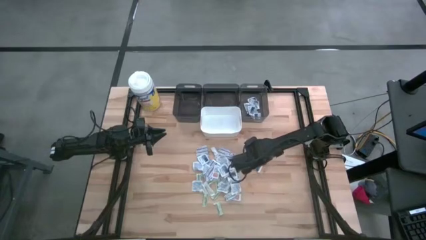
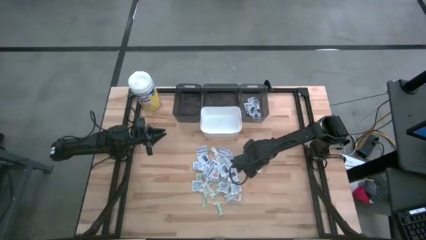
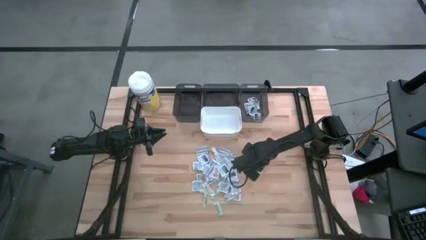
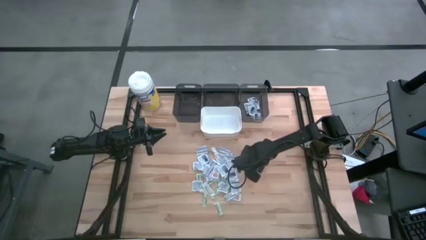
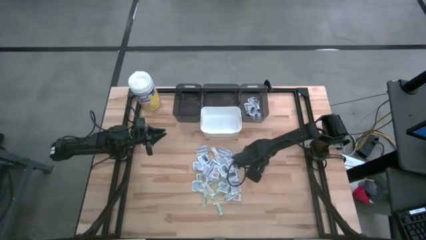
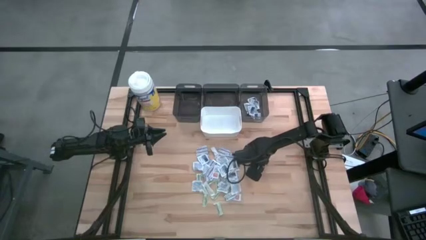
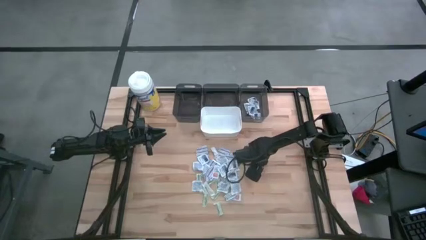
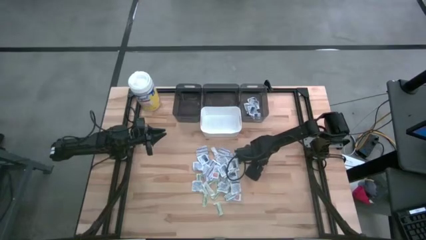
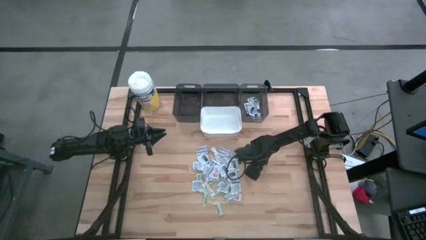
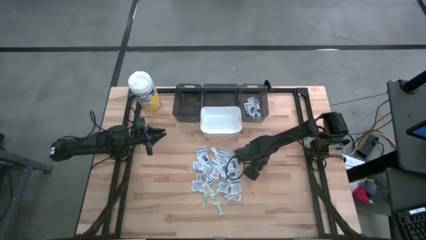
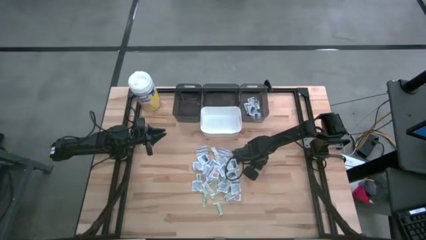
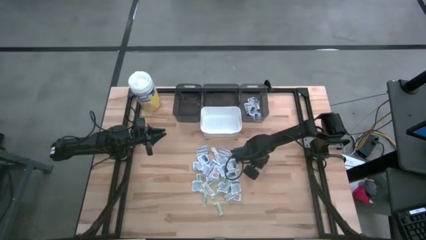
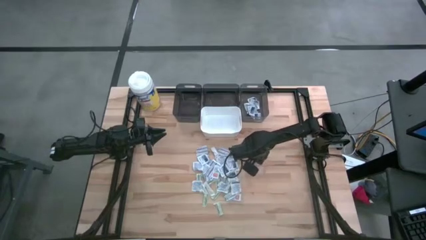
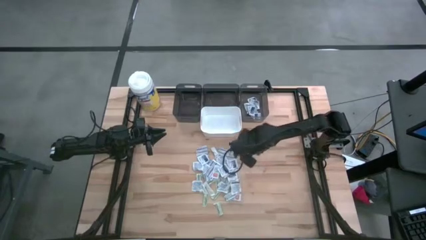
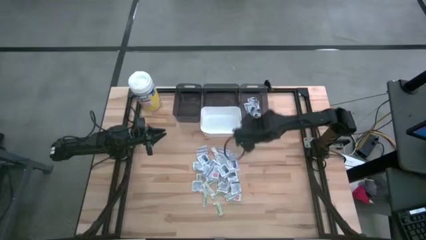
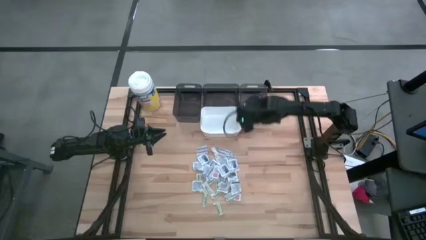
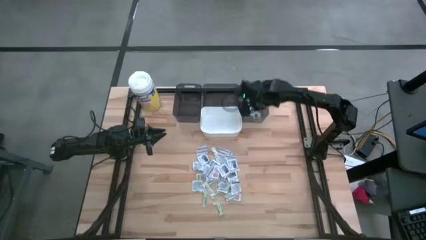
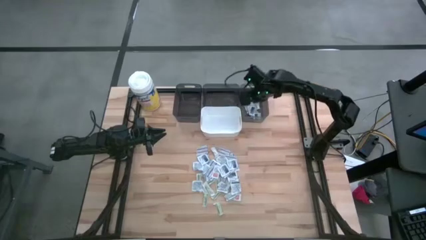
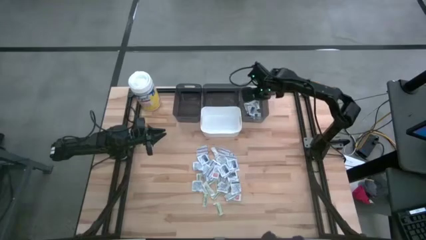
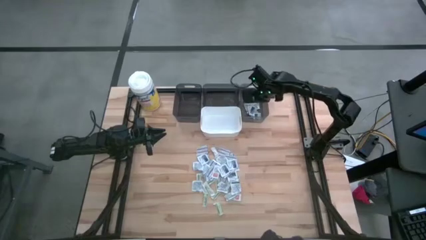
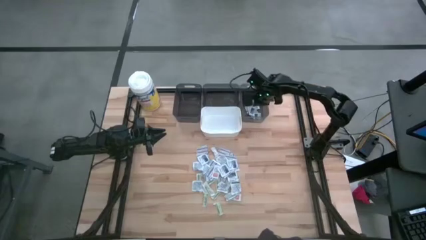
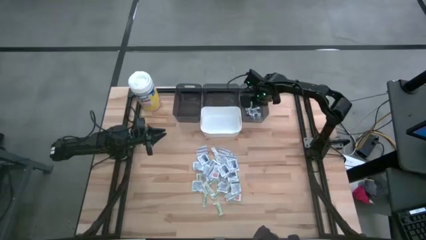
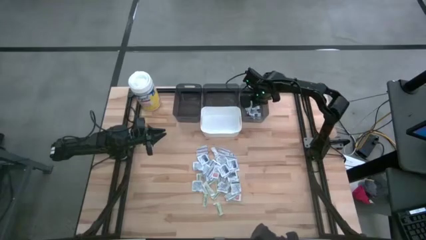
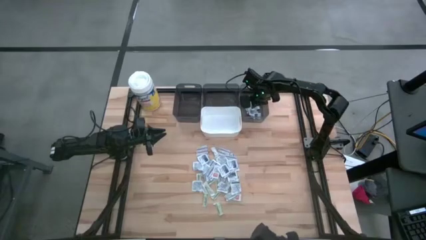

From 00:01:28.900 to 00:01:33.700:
Task: Pick & Place First Aid Supplies
Put the blue alcohol pad into the right black bin

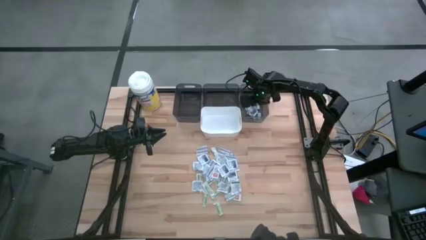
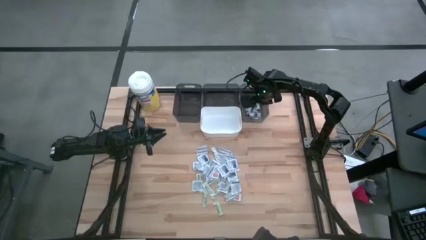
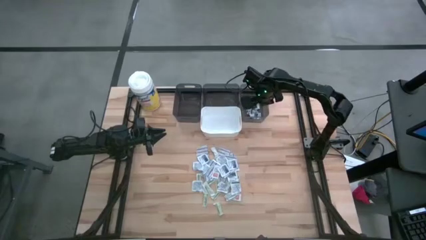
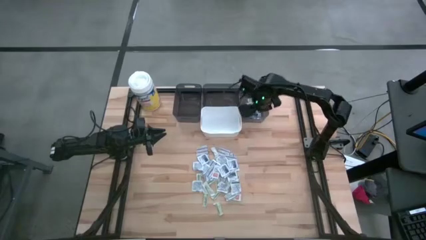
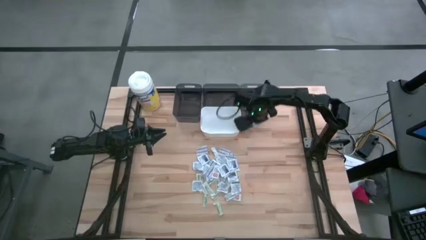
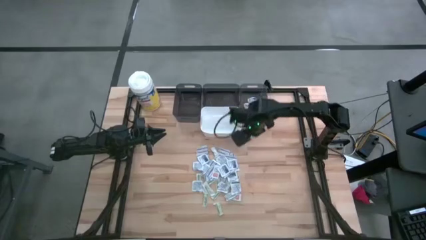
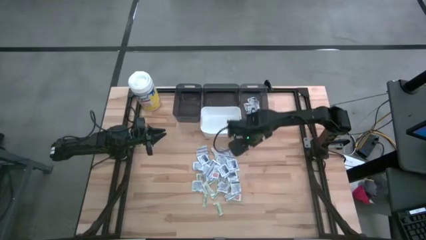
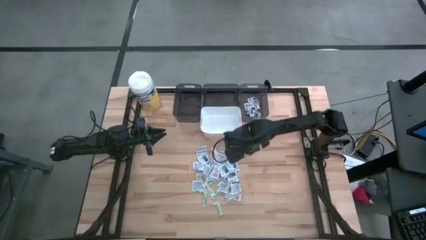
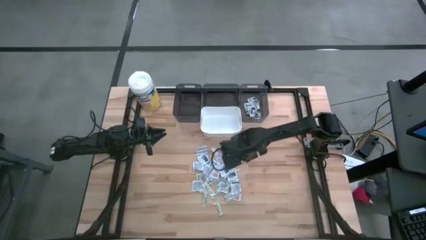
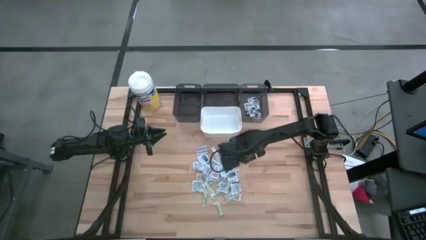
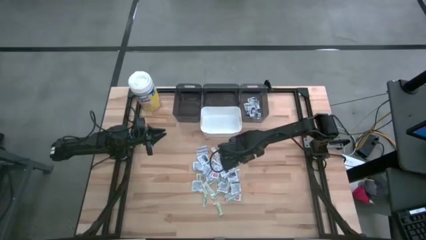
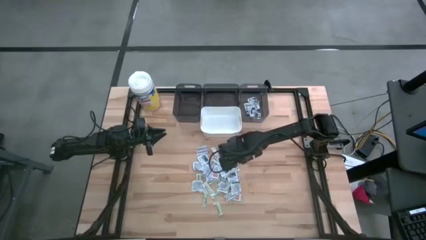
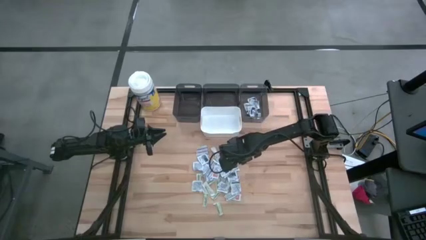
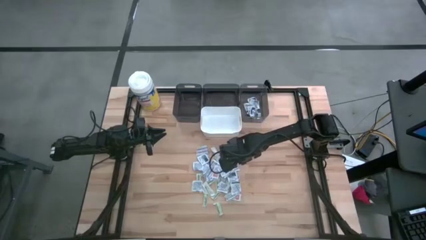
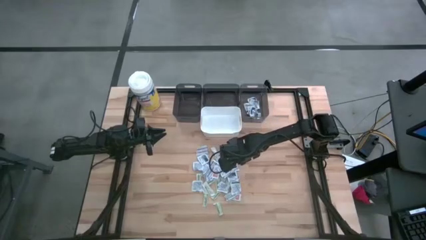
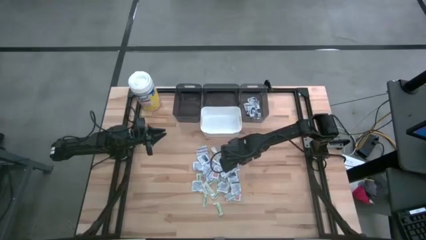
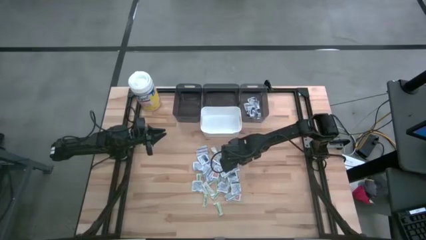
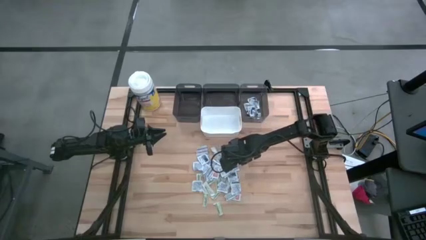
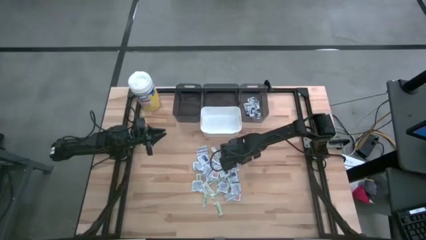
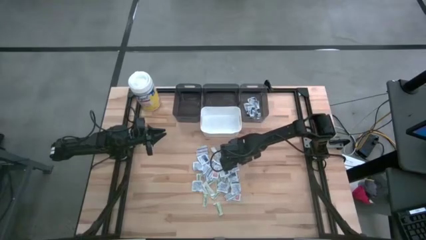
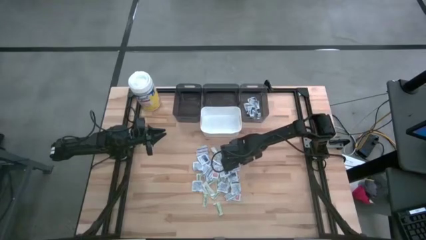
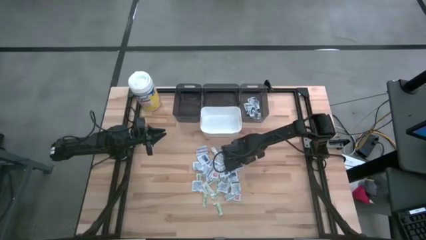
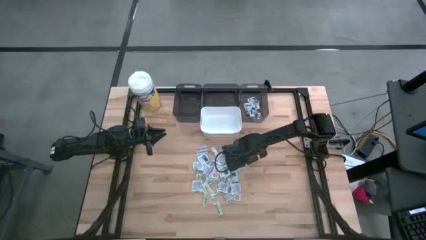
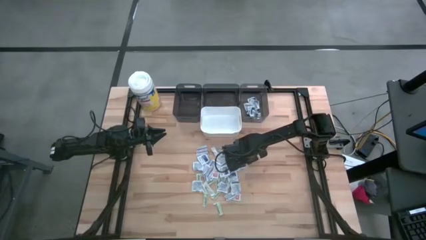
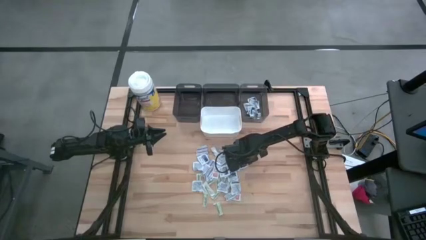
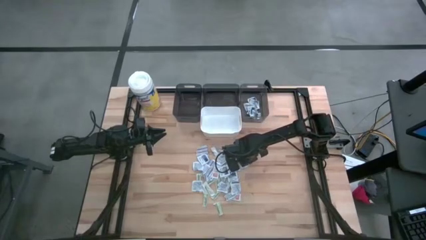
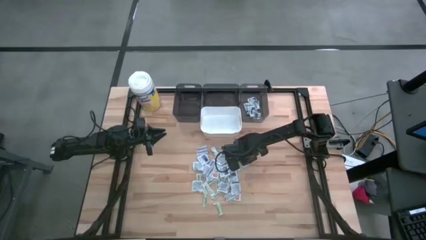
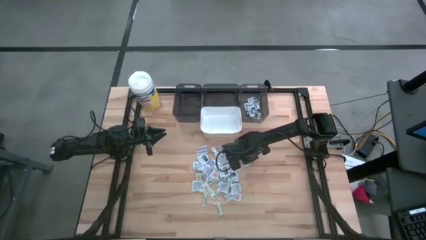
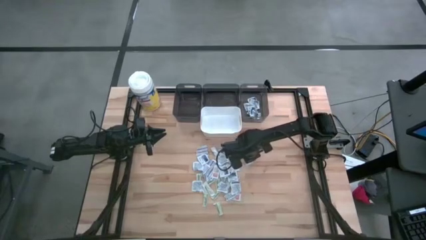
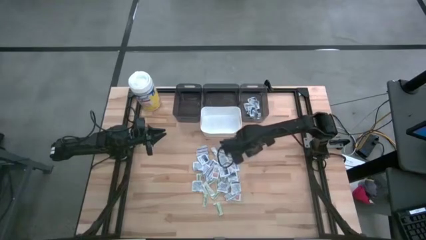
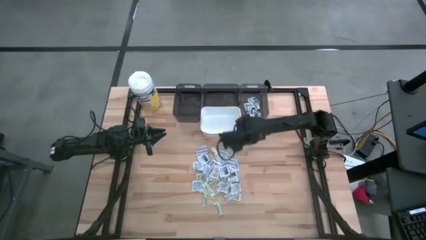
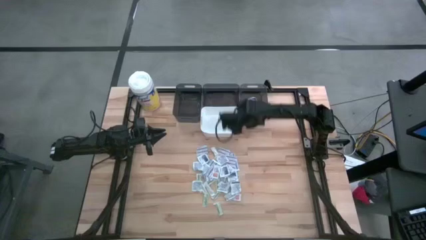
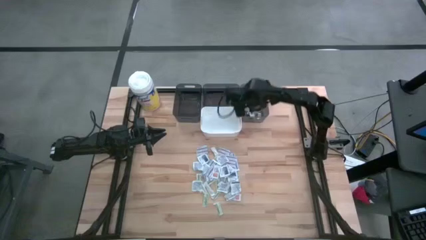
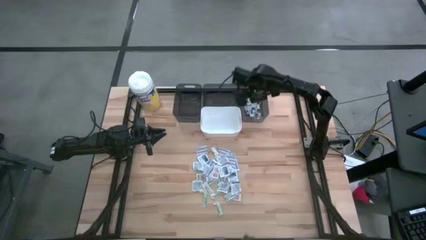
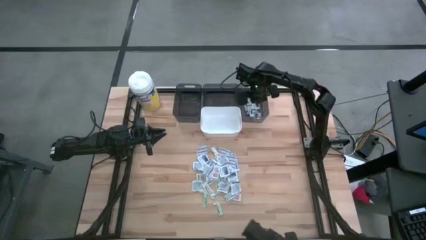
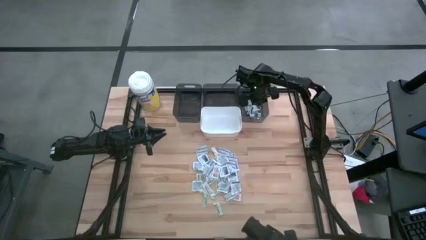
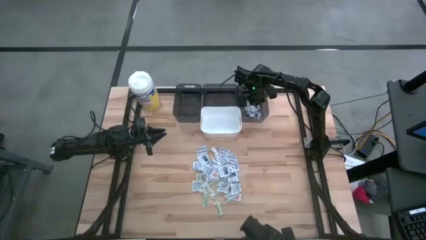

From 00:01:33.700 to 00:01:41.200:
Put the blue alcohol pad into the right black bin

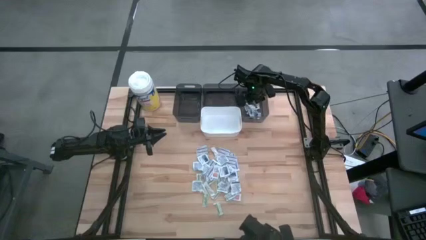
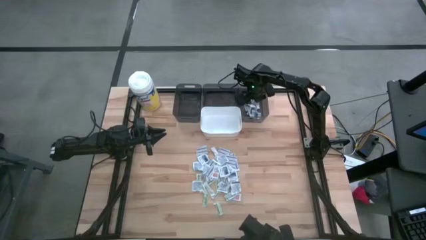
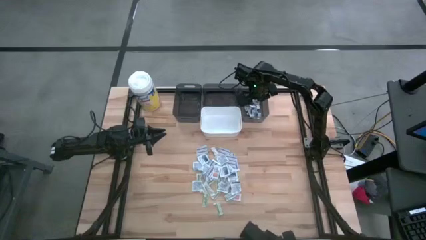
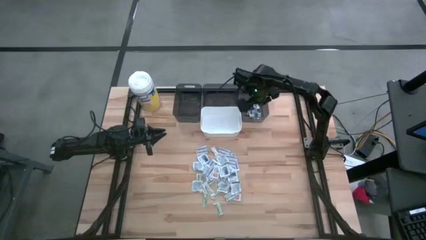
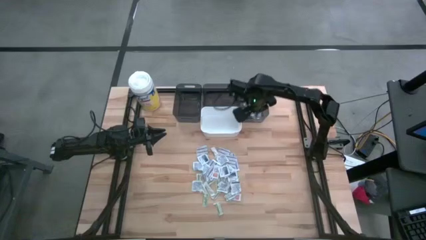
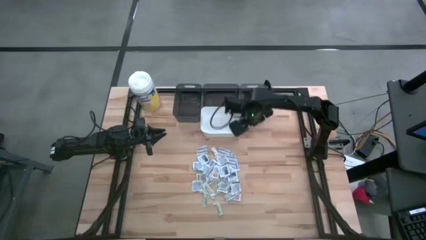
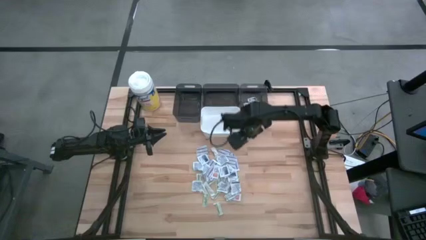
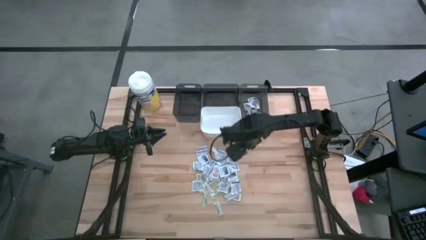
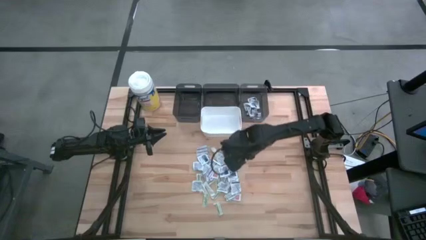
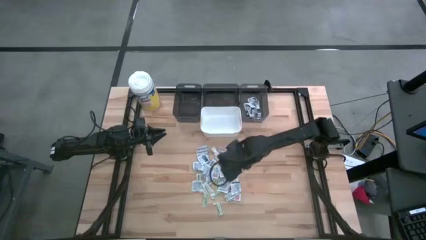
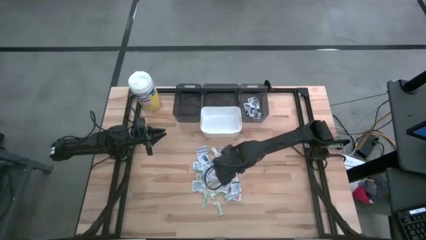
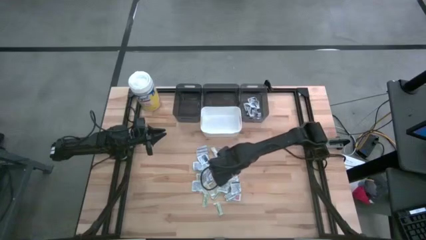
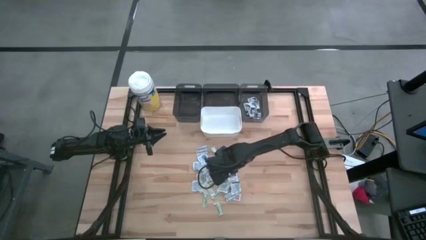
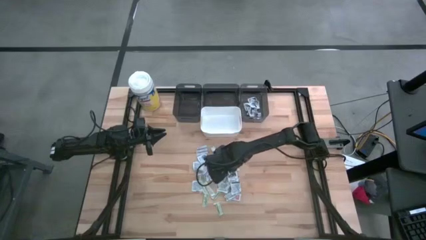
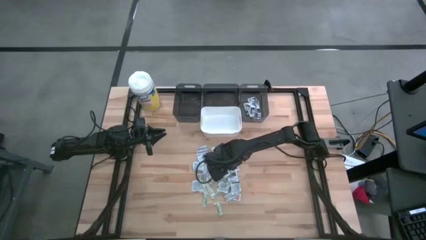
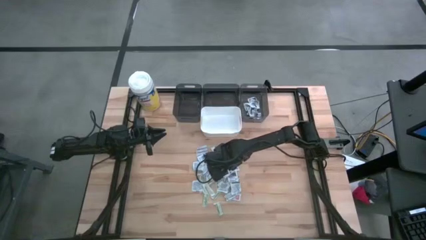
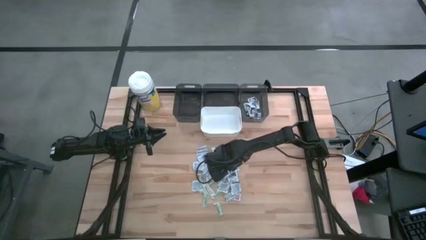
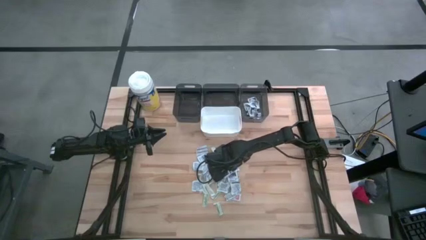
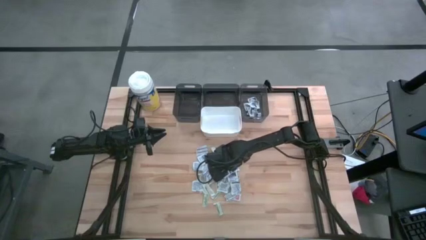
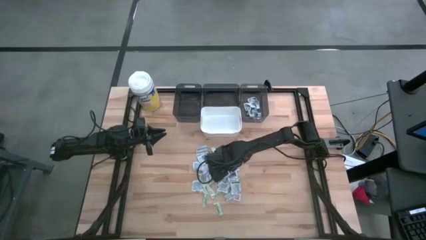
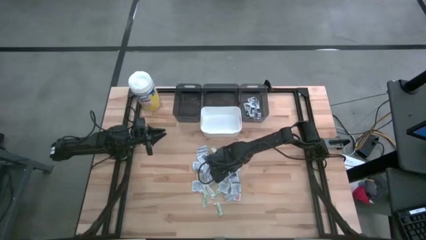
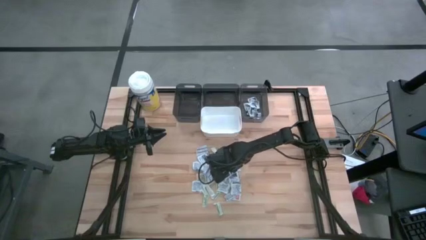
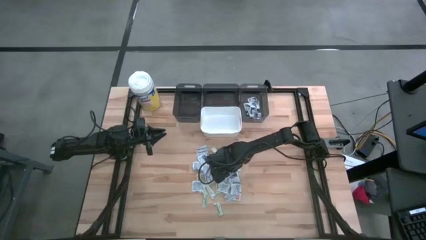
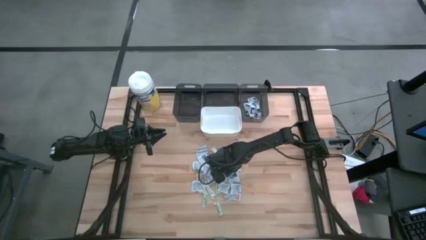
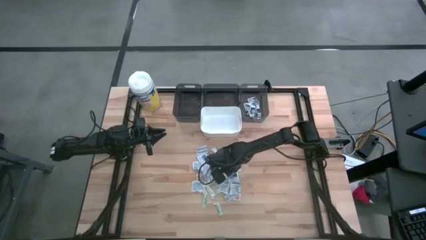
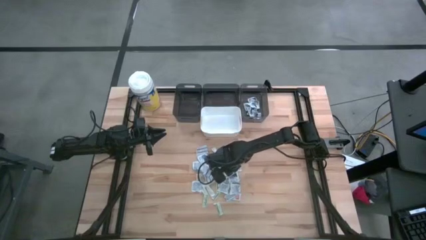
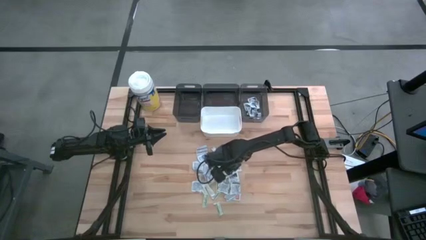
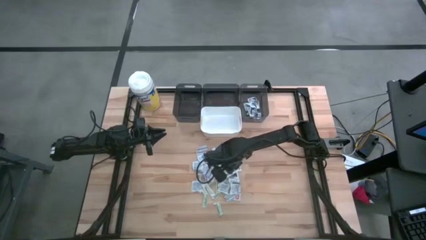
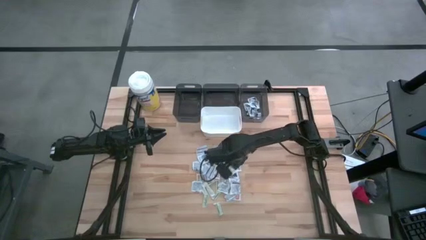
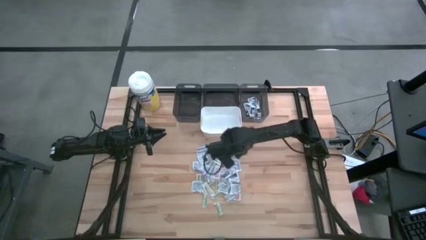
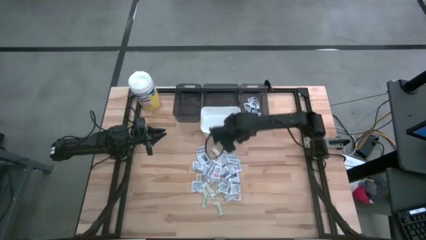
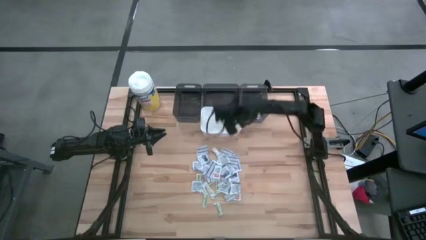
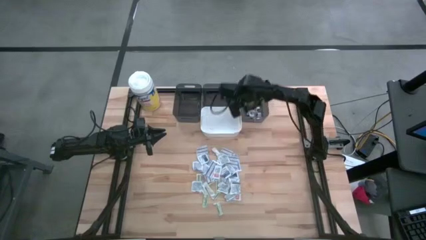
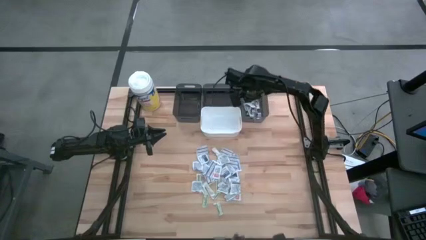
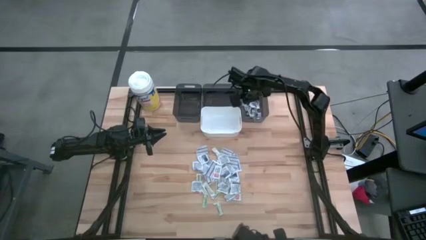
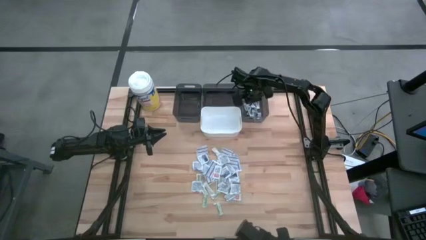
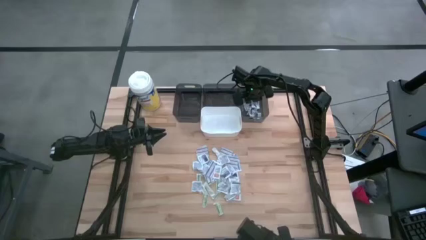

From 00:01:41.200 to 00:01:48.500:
Put the blue alcohol pad into the right black bin
